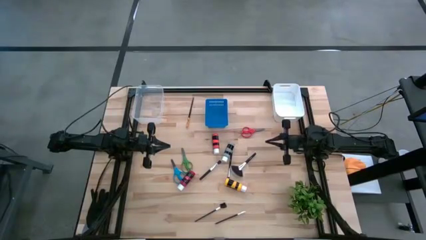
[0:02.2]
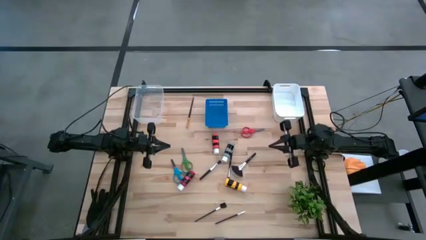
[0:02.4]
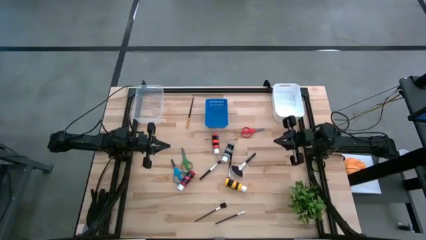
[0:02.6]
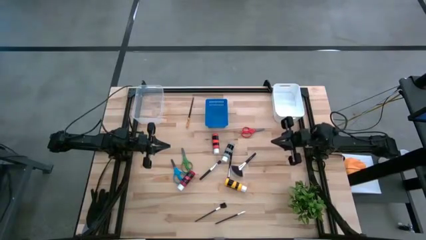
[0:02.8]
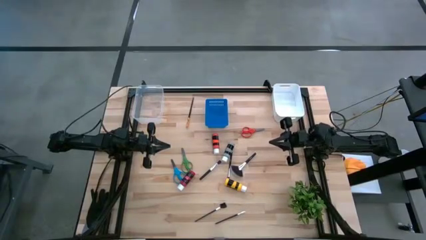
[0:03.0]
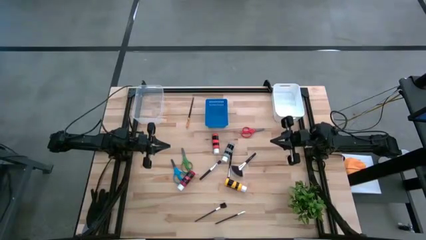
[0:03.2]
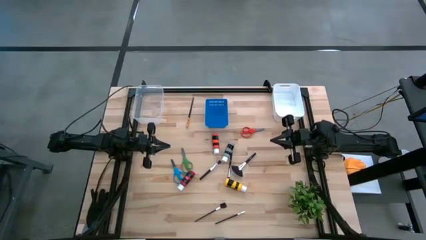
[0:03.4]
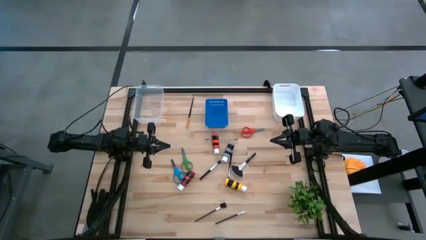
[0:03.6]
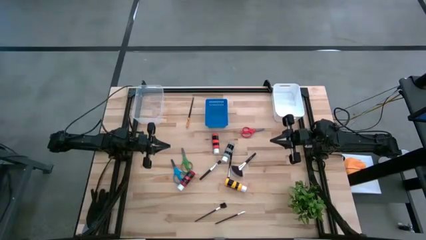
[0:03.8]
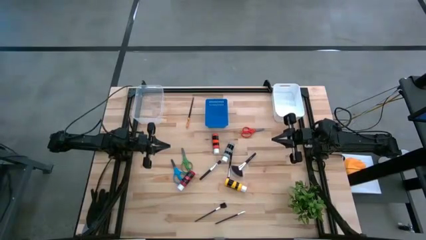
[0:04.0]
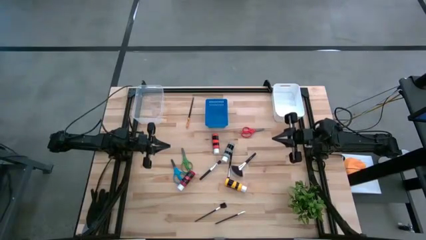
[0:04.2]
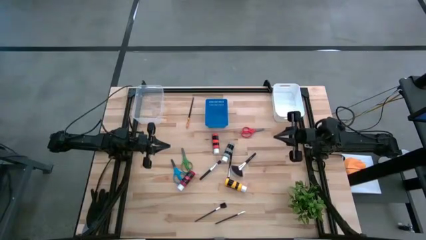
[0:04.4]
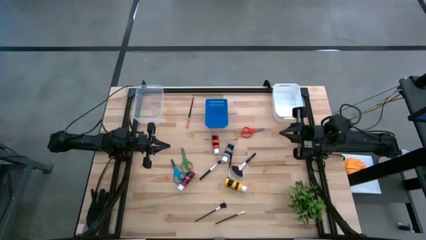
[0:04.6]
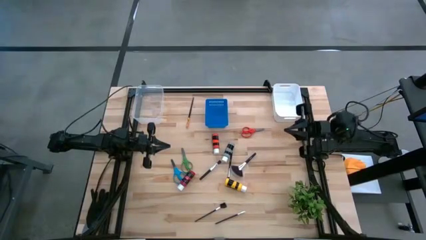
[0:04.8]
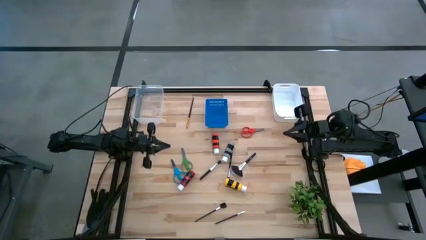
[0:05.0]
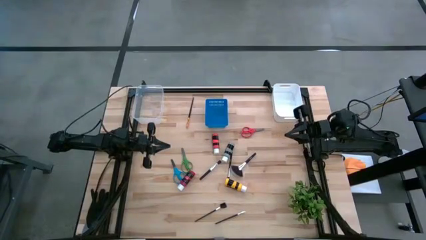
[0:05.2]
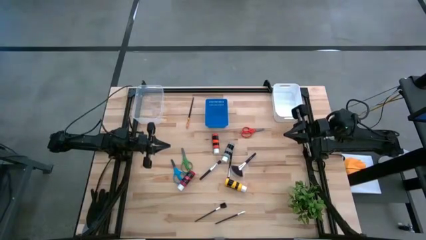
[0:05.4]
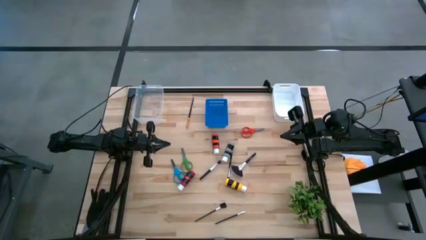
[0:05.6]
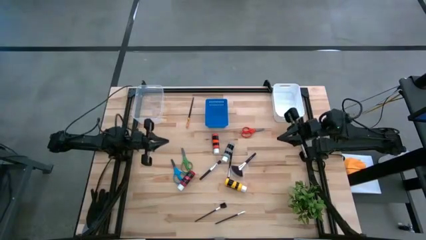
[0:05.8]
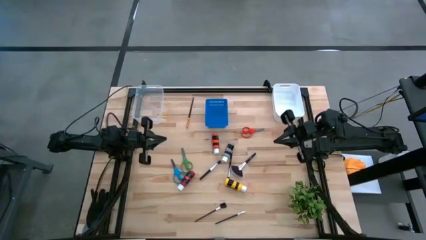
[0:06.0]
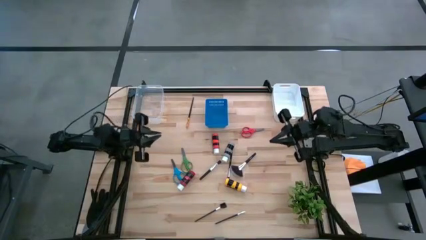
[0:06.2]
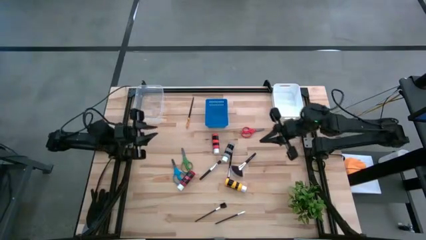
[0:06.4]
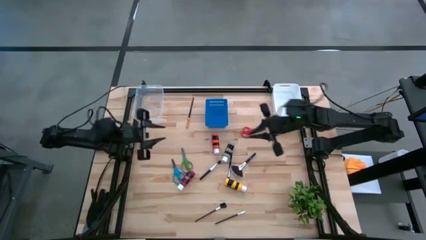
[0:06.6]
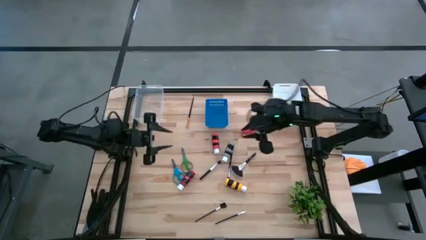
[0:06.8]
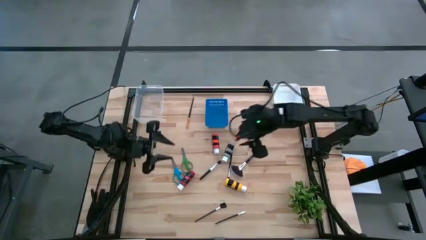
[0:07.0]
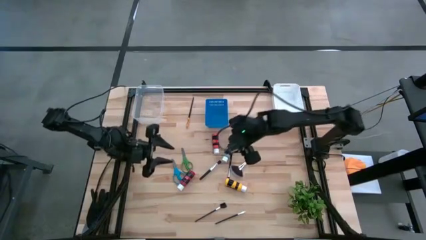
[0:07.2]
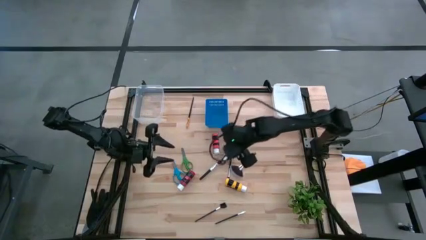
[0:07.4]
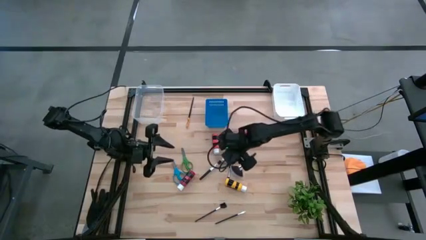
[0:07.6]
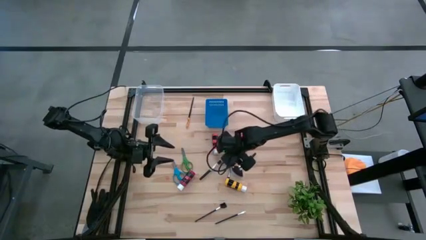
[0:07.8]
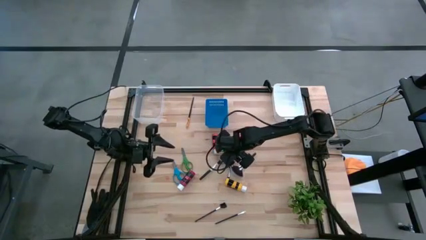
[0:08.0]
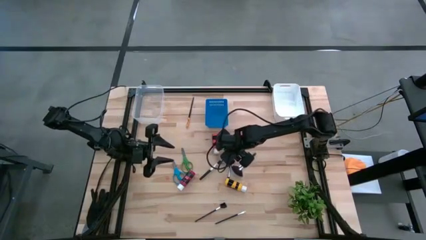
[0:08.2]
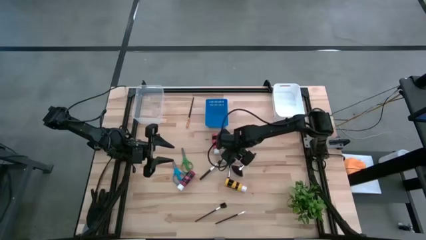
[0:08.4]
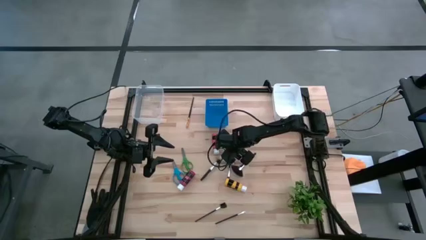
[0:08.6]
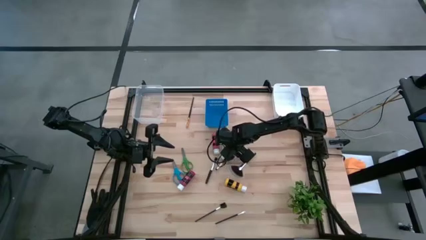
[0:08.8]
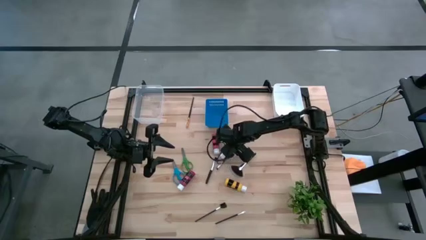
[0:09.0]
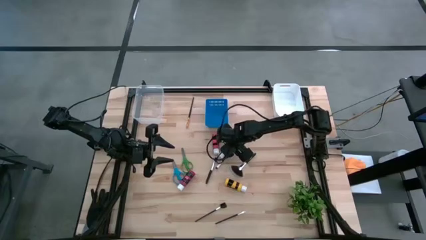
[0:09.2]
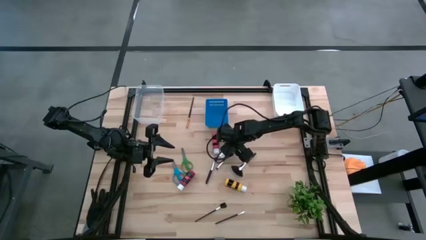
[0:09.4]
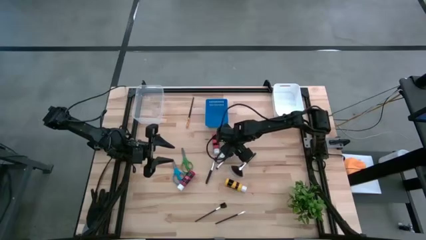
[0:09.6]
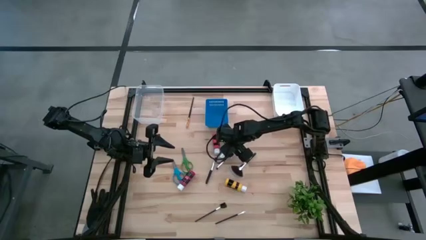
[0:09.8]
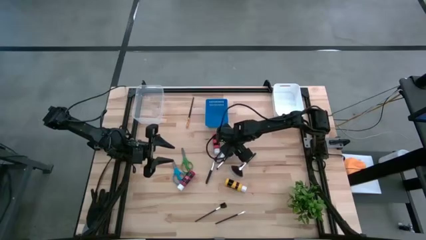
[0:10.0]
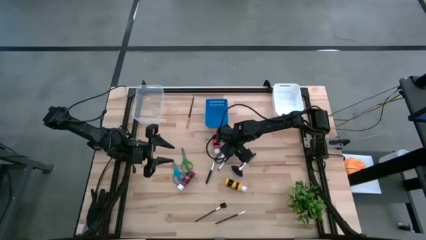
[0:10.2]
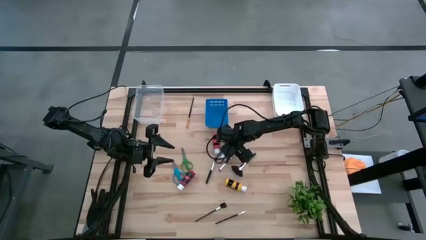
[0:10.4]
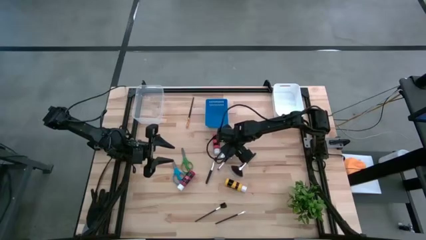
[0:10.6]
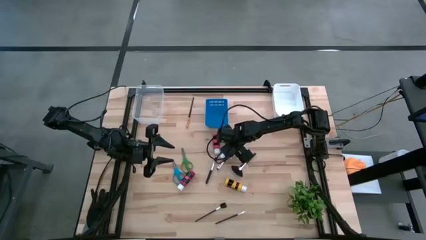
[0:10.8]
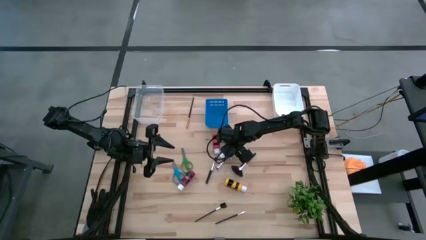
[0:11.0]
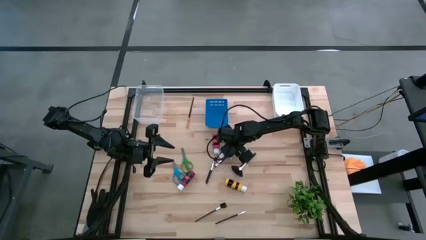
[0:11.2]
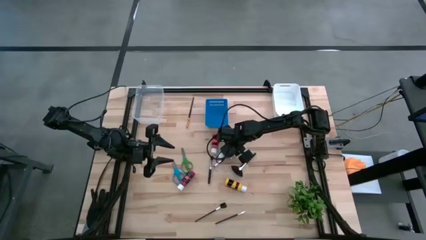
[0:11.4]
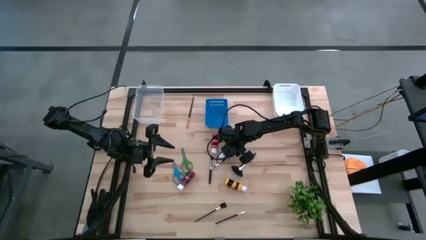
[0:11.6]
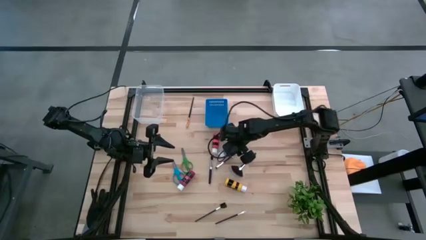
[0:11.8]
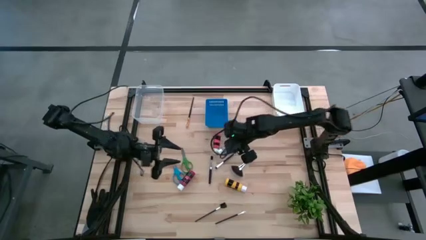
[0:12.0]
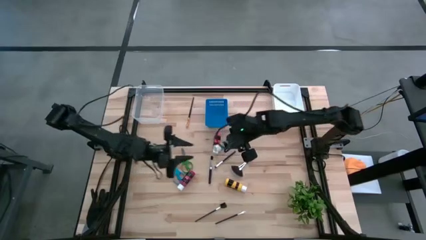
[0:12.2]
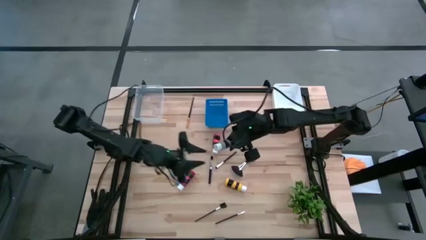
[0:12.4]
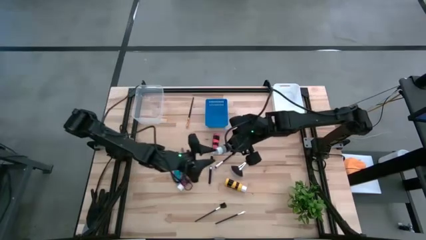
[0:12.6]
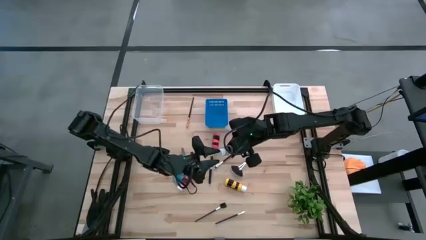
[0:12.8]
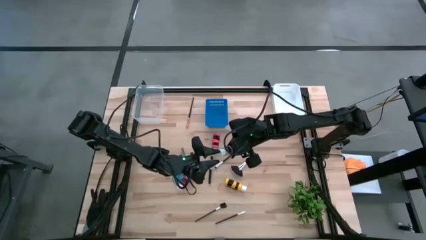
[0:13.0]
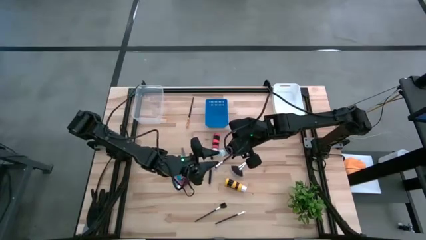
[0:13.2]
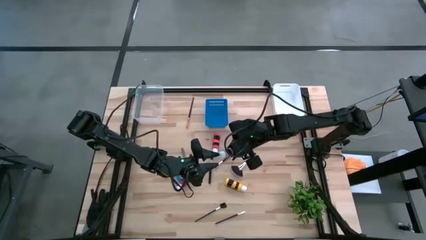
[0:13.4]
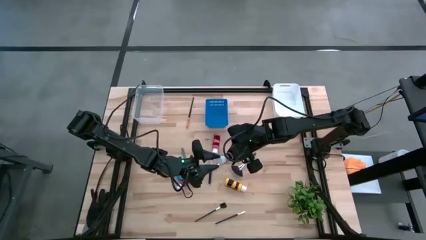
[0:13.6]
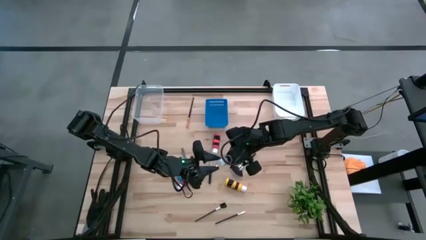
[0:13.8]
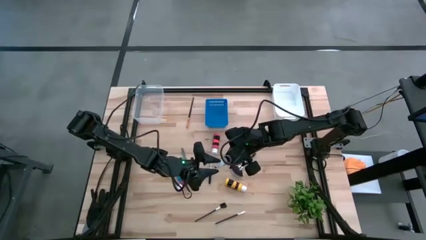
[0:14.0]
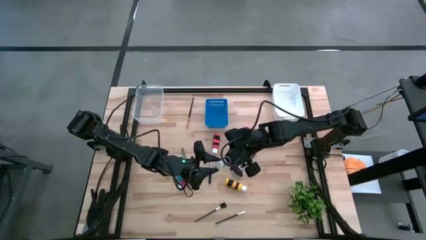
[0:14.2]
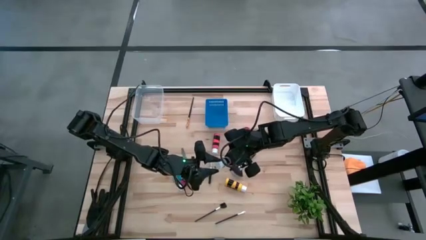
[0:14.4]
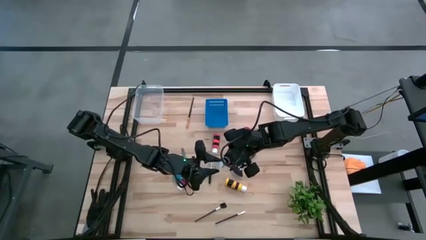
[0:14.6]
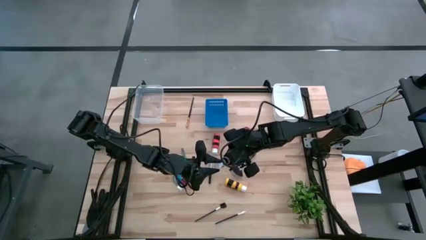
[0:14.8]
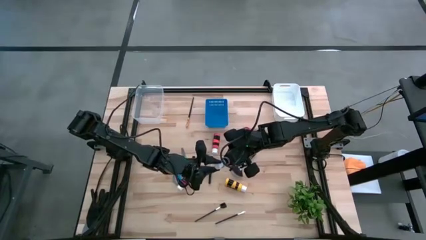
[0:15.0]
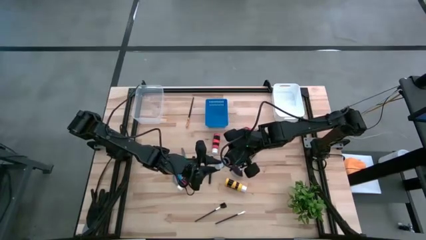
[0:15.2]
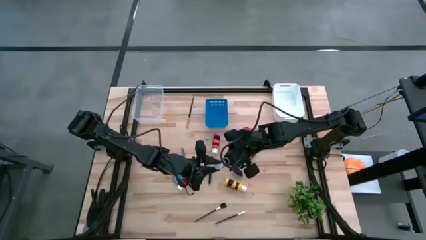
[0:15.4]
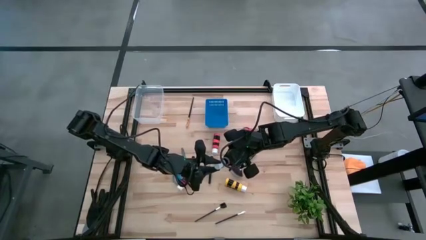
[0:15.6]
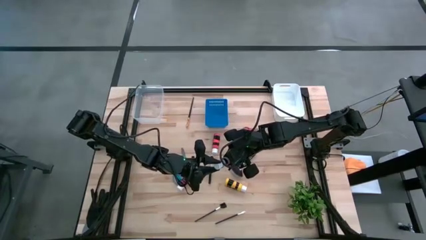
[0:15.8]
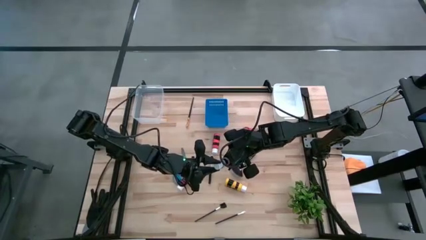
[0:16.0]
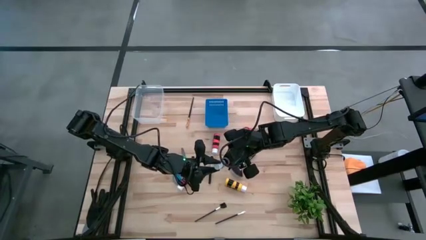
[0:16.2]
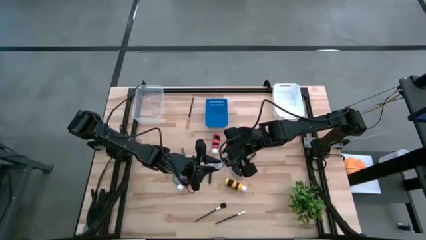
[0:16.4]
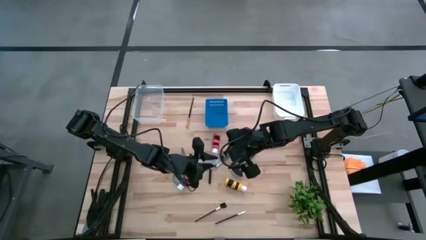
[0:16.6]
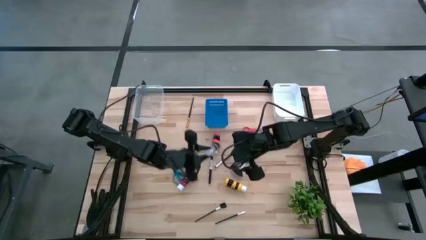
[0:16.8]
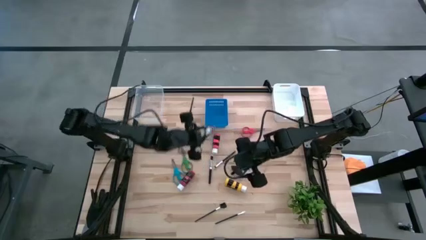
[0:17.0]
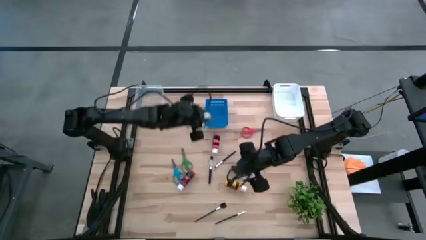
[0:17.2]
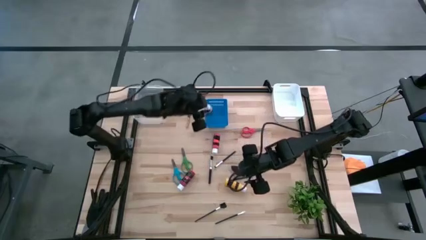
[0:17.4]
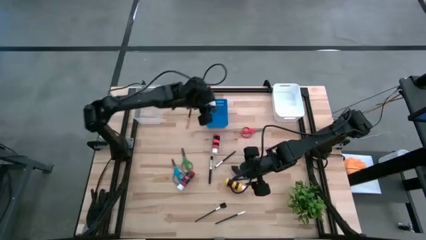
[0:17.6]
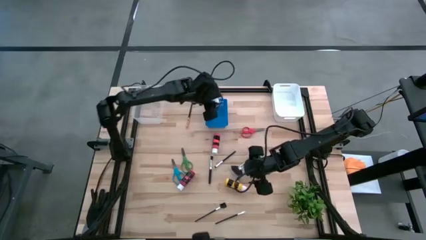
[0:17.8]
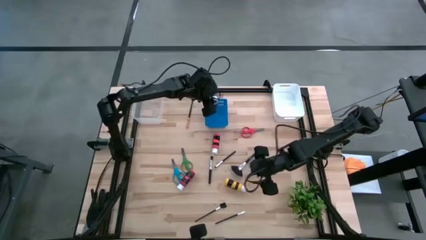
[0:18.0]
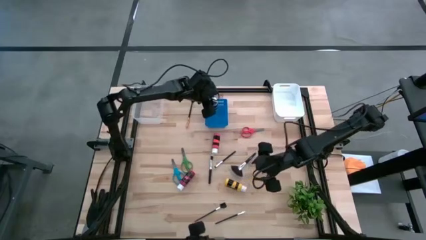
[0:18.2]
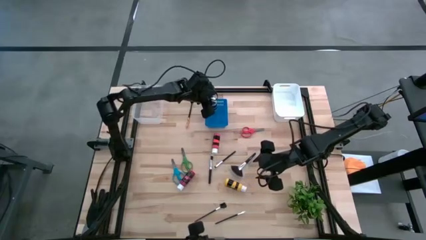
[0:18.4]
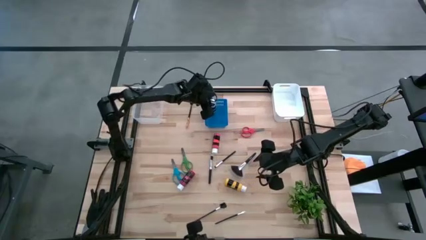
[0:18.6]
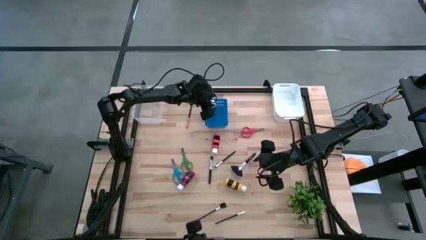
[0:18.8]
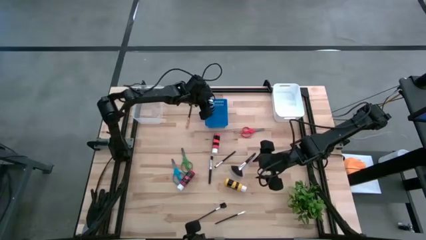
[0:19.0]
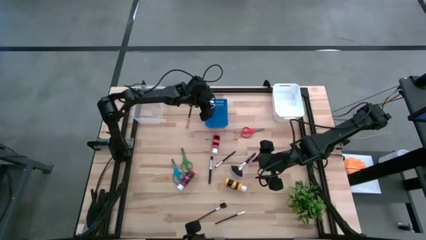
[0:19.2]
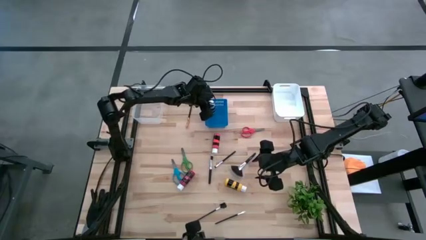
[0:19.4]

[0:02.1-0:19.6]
Task: Pick & Place Paint Supplies
Put the gray paint bottle into the blue bin
